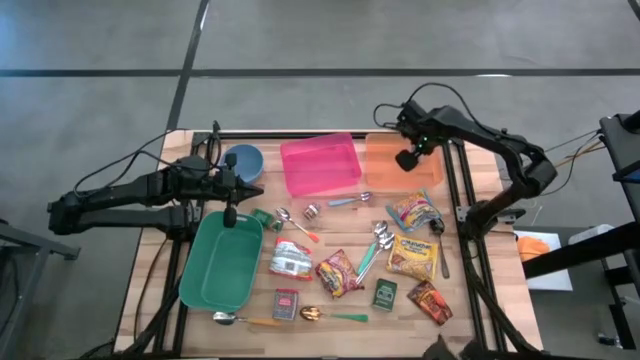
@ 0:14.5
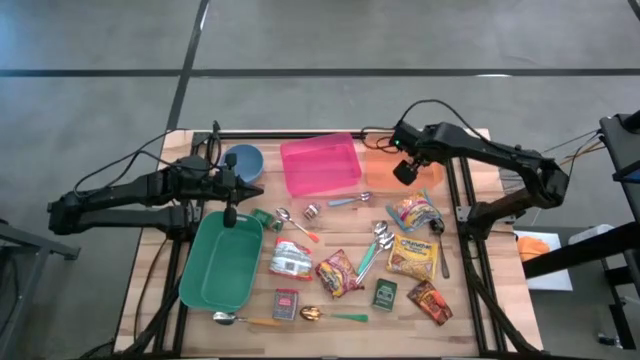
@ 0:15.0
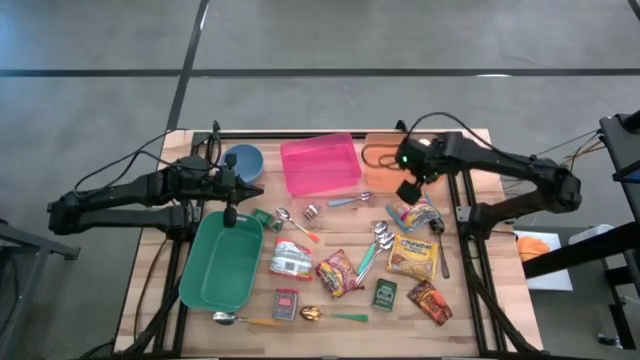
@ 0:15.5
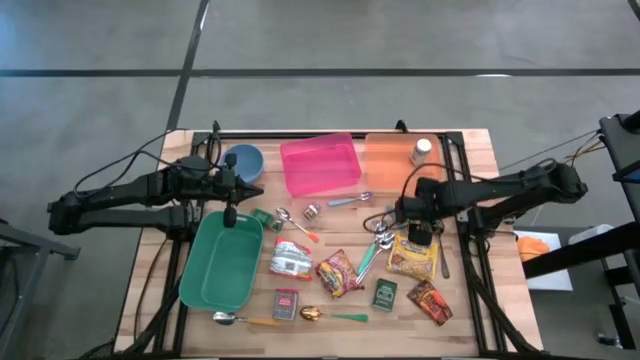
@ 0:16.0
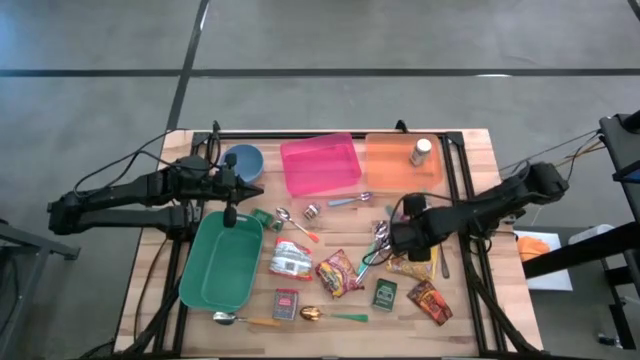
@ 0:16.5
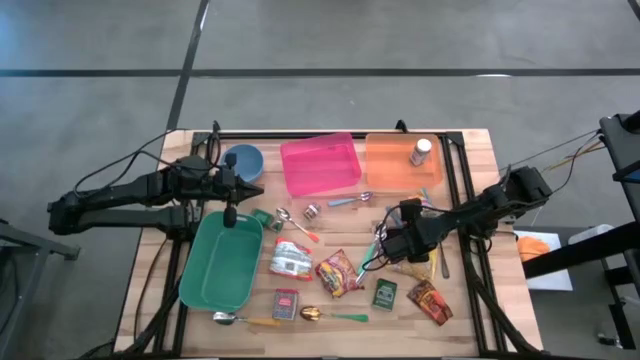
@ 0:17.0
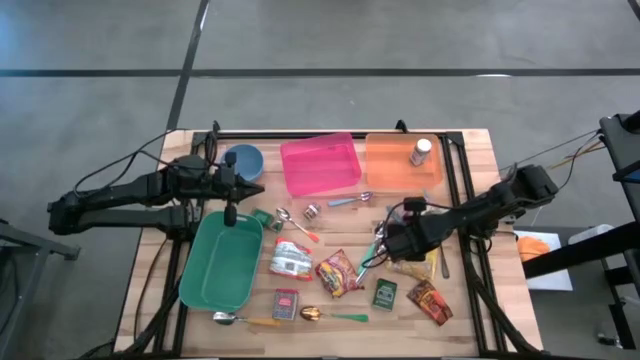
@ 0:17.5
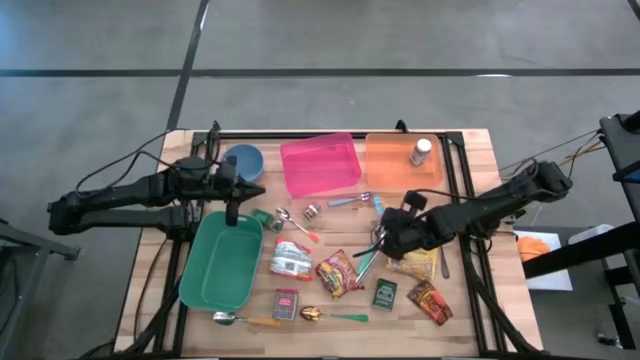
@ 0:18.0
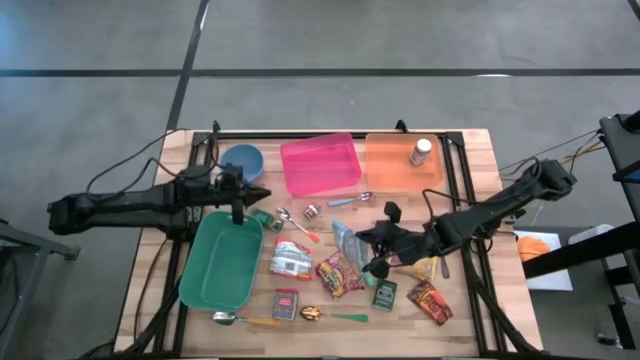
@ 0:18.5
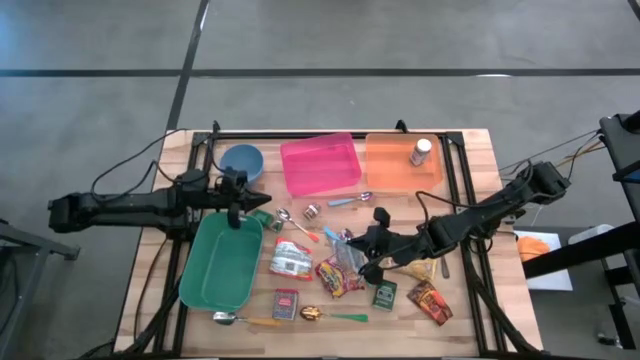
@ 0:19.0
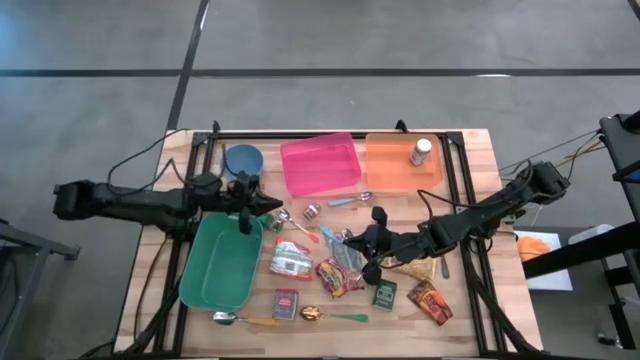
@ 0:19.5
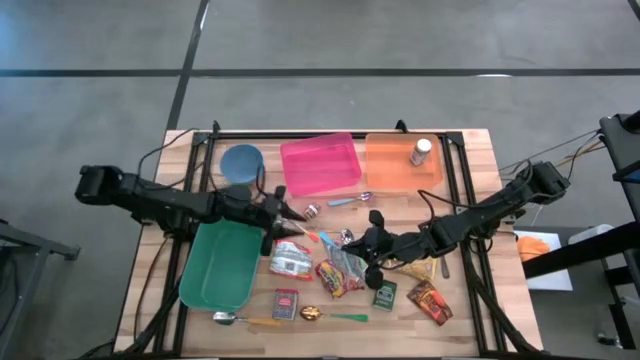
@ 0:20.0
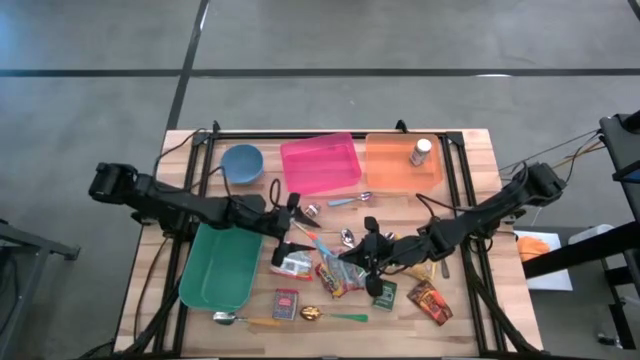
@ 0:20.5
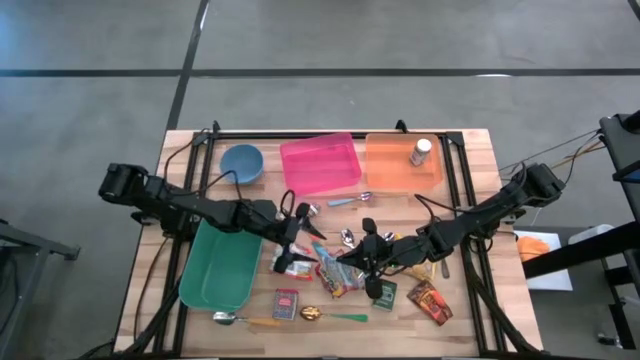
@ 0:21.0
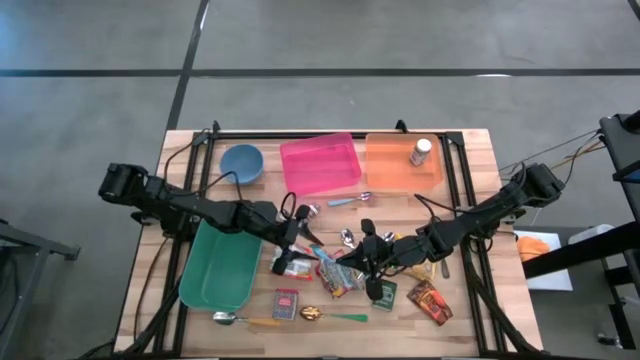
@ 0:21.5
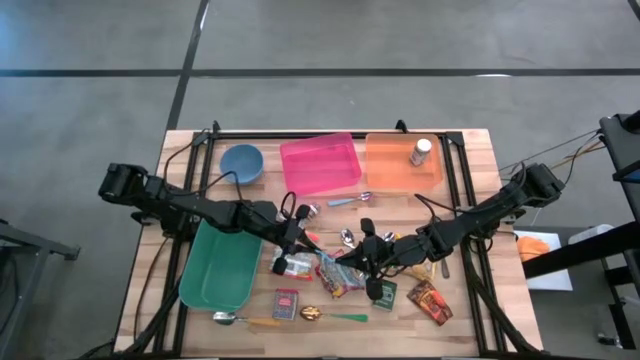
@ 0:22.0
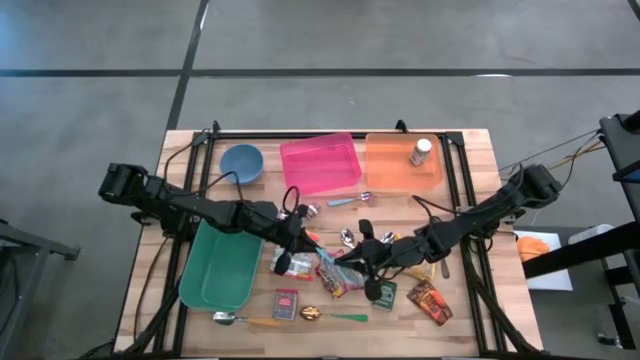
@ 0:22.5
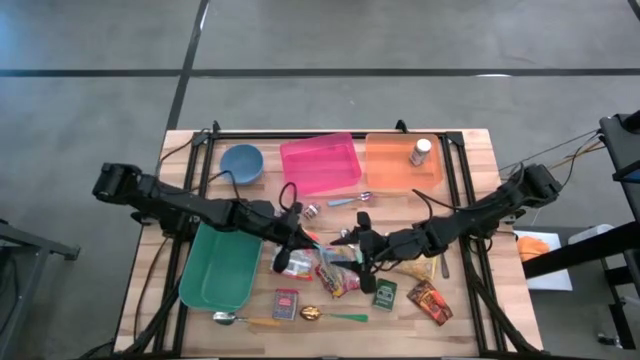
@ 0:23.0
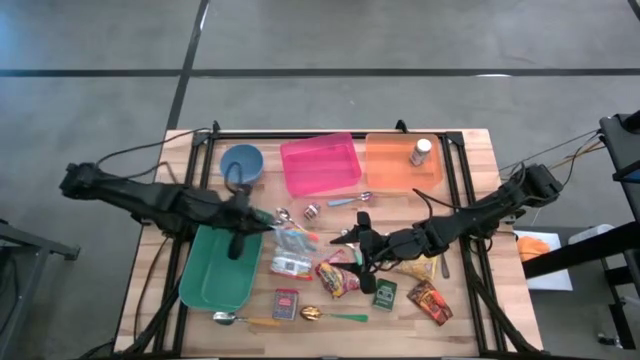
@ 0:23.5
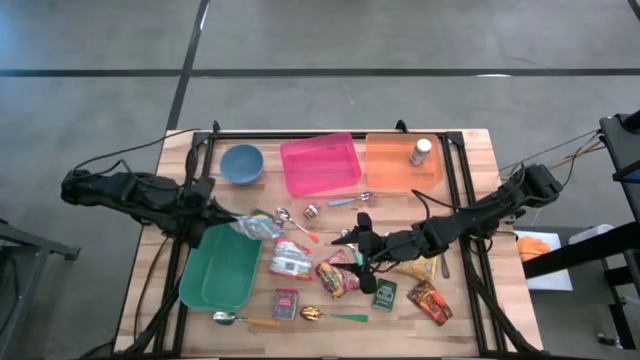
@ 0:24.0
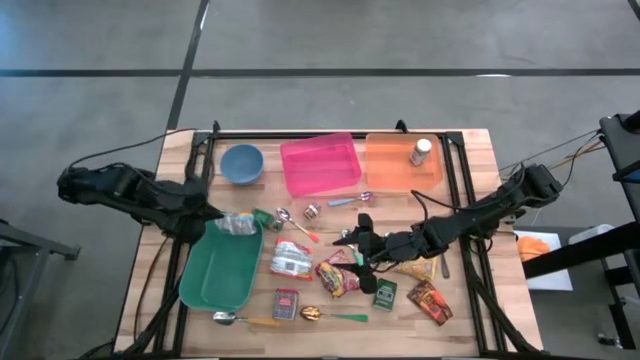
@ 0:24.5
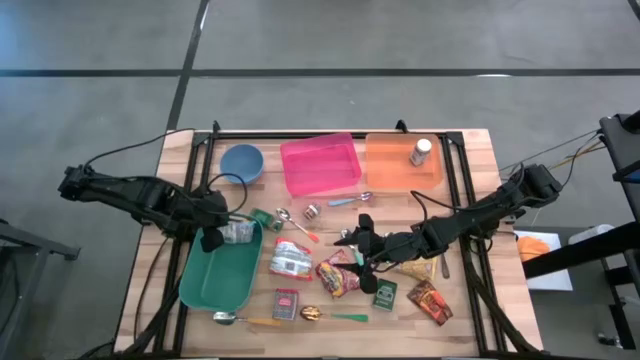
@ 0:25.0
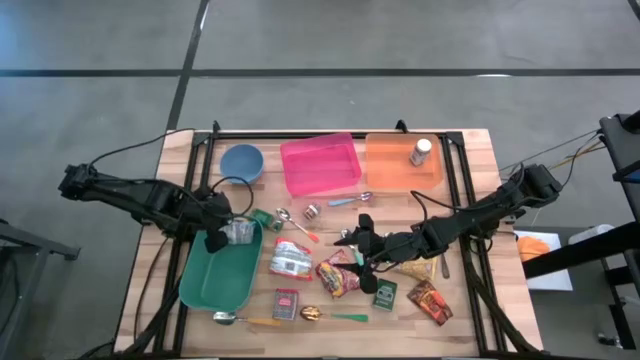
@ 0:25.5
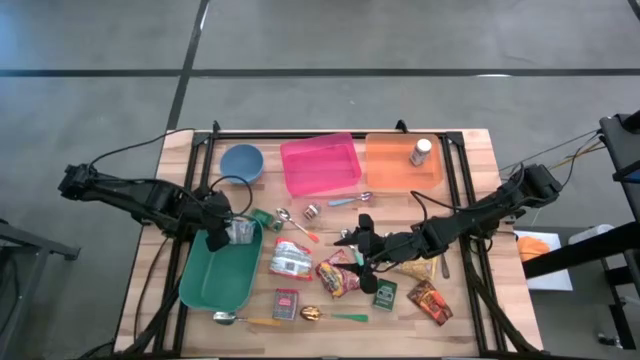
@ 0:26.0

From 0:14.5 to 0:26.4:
Put the bottom blue noodle pack into the green bin

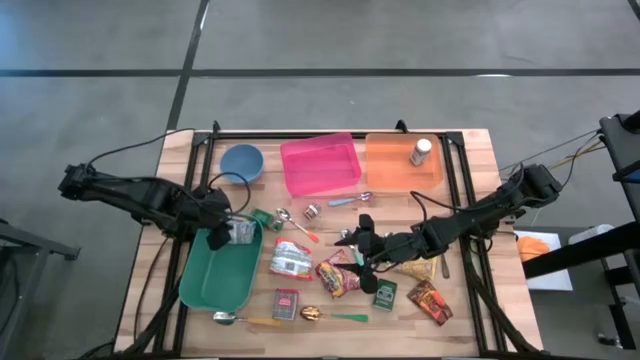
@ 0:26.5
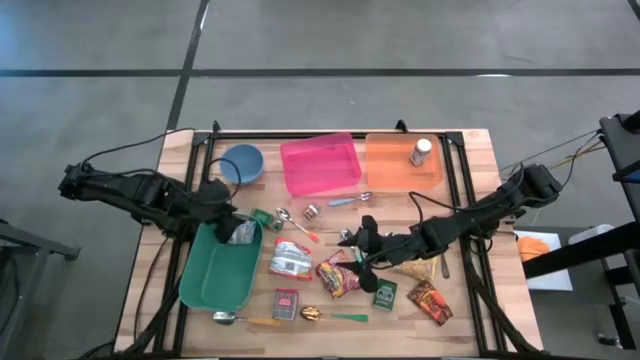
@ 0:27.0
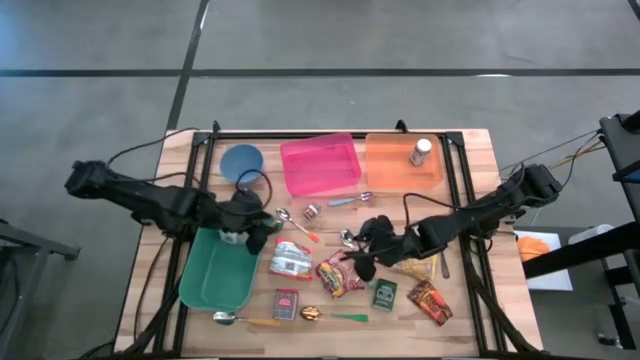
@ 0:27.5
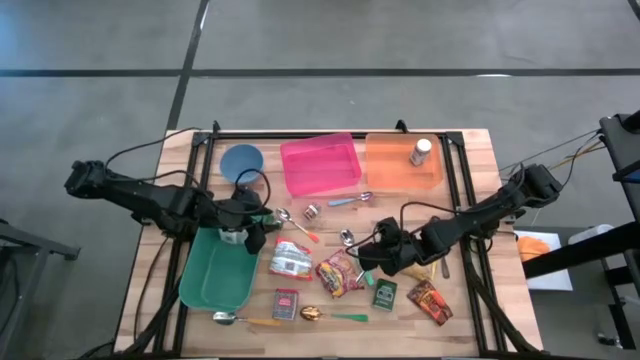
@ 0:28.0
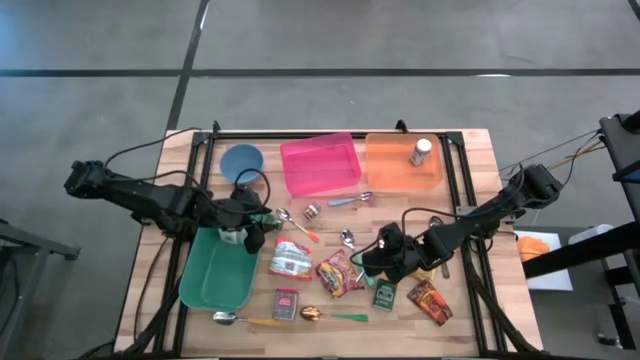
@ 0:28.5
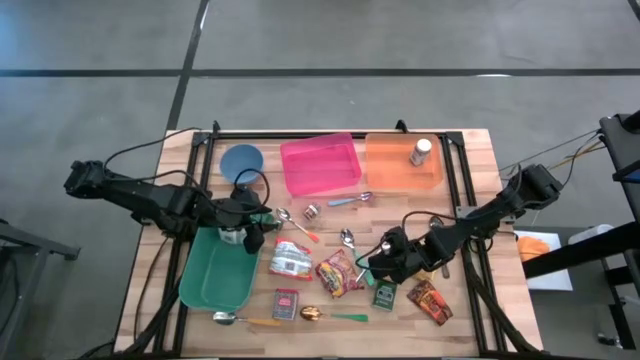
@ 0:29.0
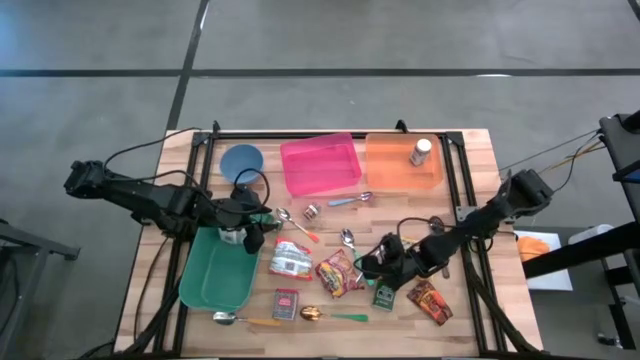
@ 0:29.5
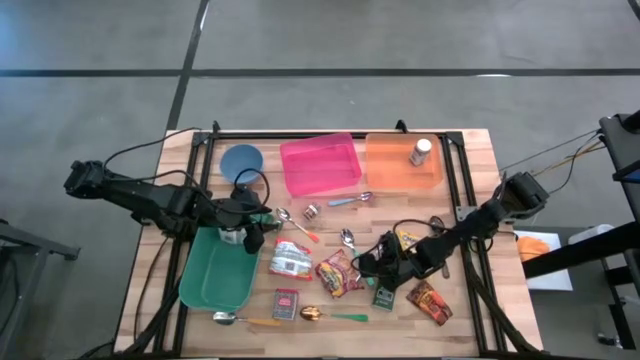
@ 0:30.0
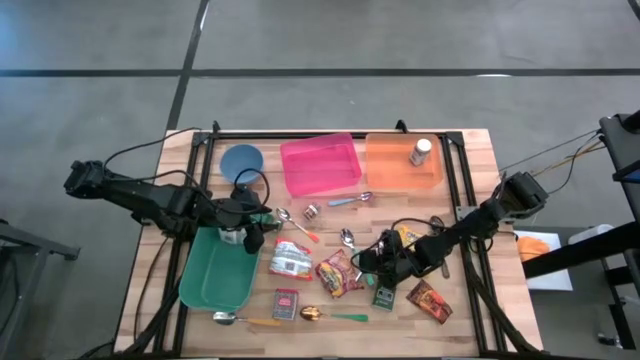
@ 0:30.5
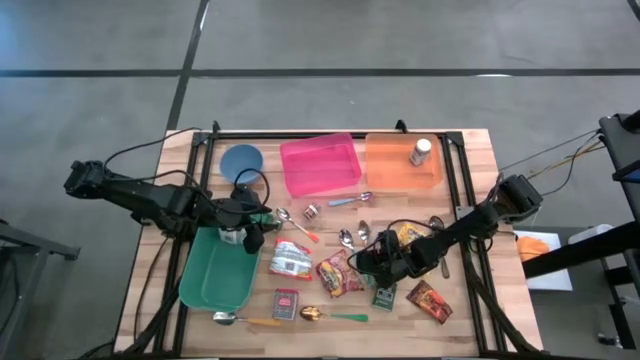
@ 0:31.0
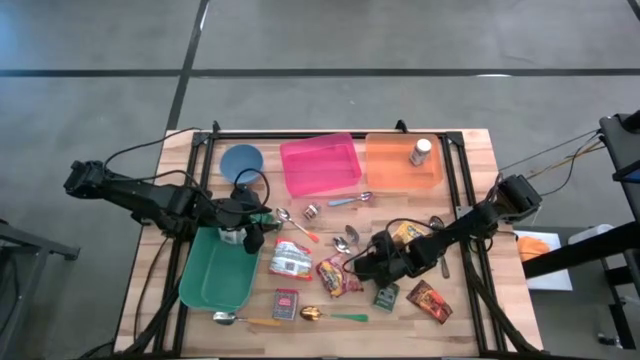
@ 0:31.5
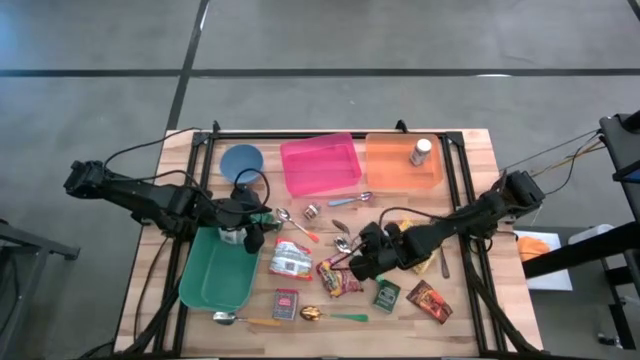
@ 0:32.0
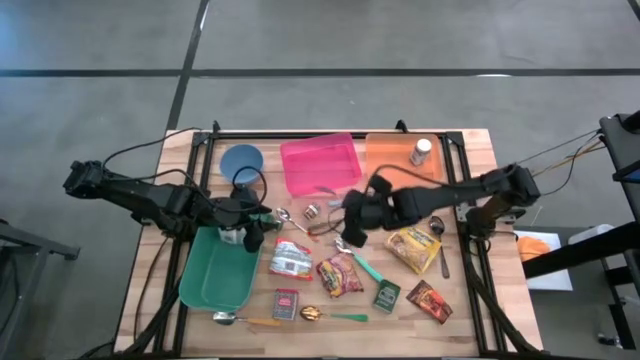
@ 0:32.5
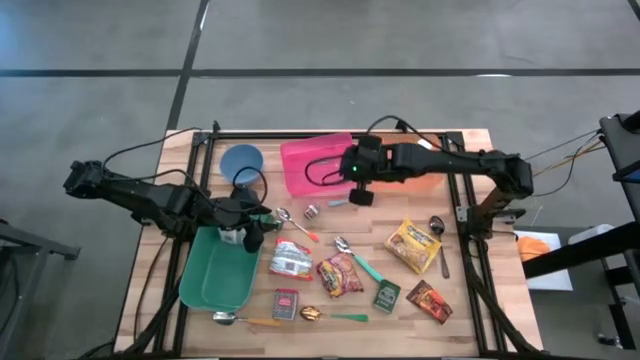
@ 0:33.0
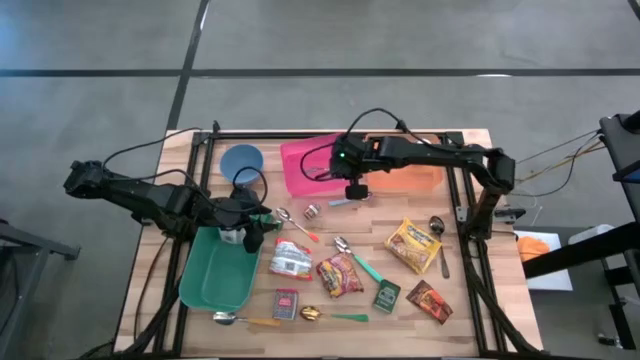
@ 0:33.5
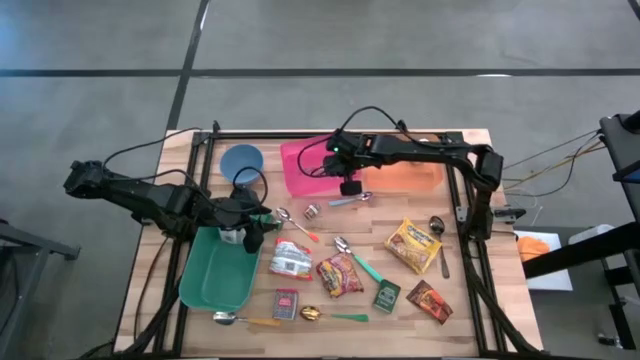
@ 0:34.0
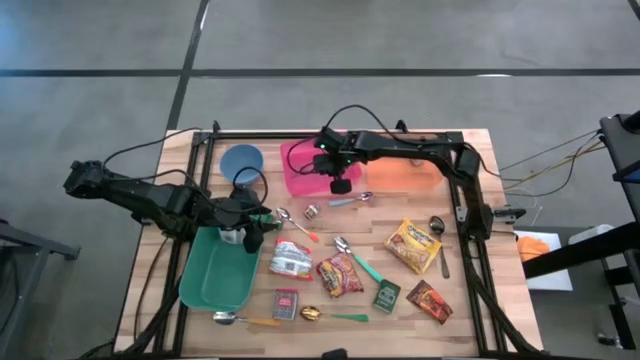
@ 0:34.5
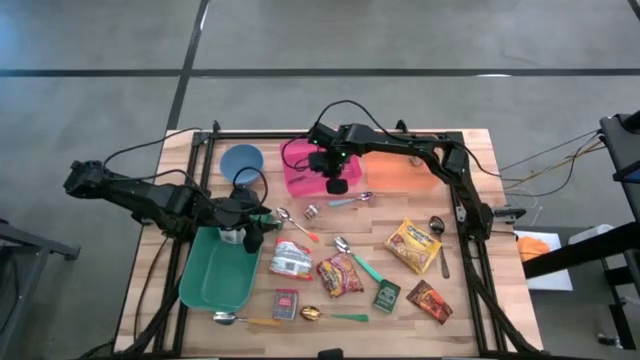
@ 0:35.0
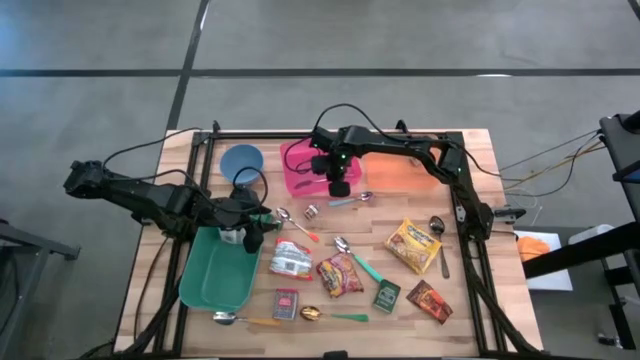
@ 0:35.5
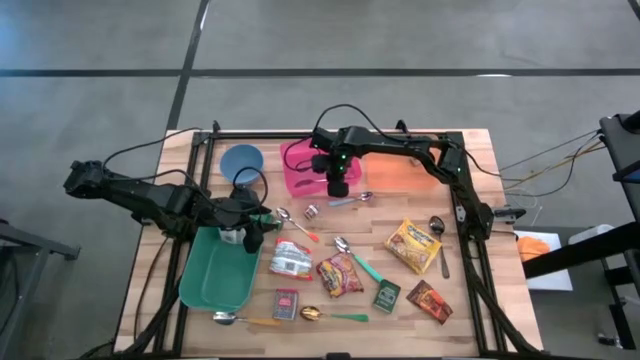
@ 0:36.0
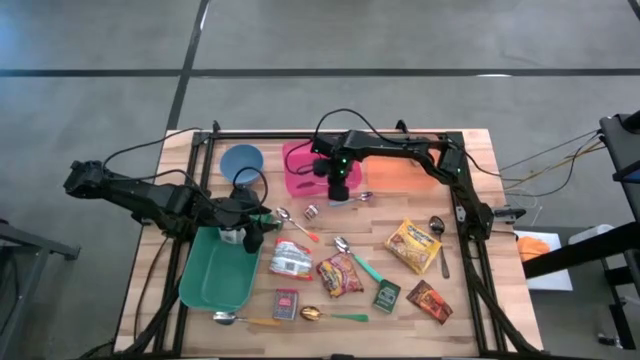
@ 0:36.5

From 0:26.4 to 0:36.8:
Put the silver spoon into the pink bin
